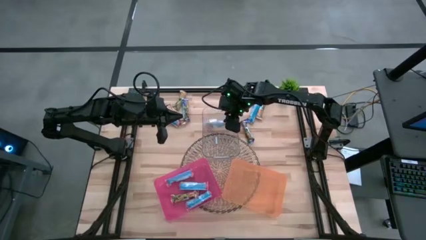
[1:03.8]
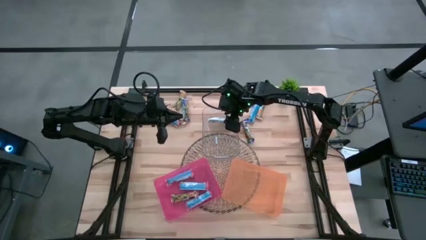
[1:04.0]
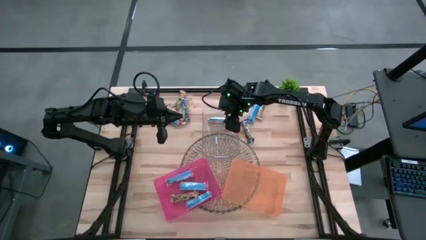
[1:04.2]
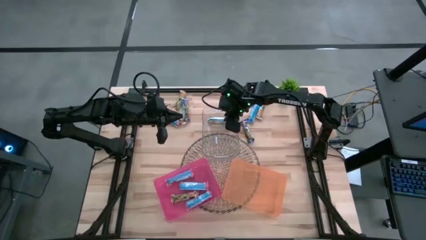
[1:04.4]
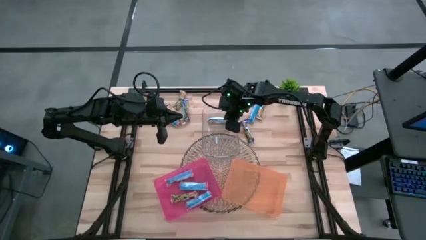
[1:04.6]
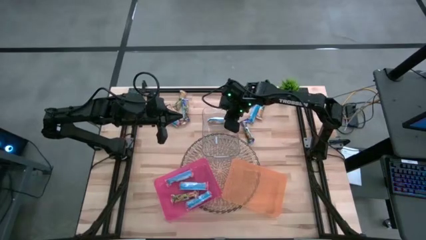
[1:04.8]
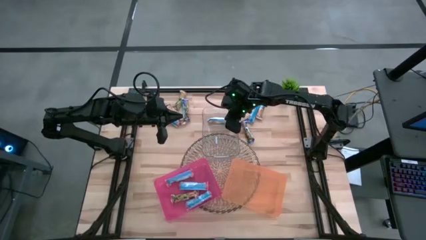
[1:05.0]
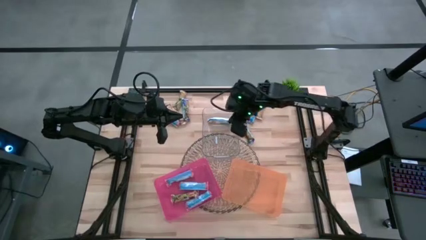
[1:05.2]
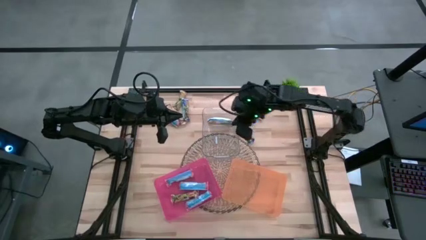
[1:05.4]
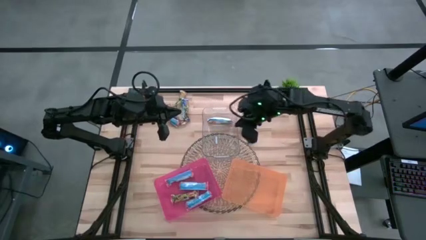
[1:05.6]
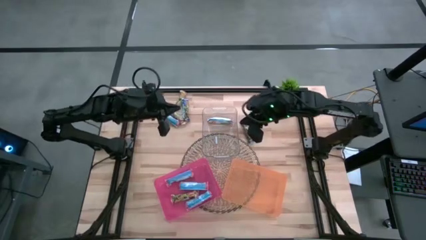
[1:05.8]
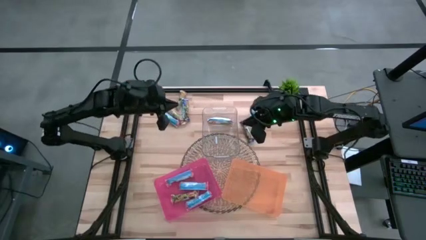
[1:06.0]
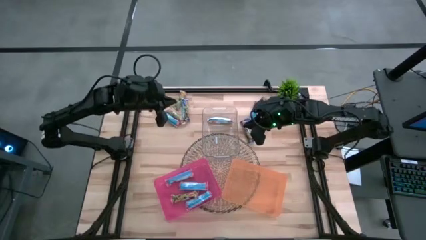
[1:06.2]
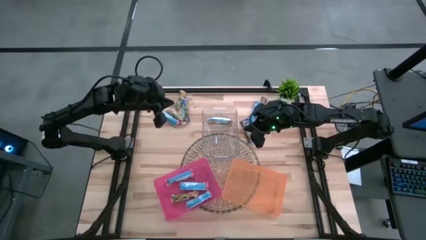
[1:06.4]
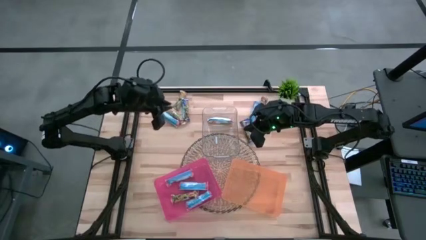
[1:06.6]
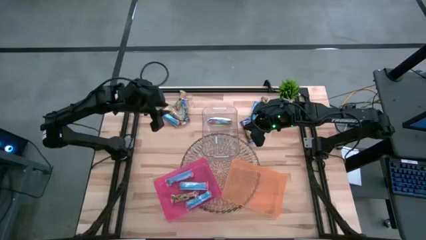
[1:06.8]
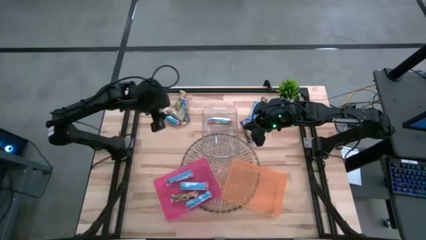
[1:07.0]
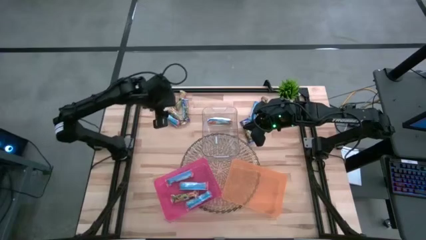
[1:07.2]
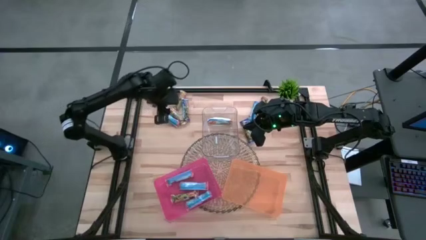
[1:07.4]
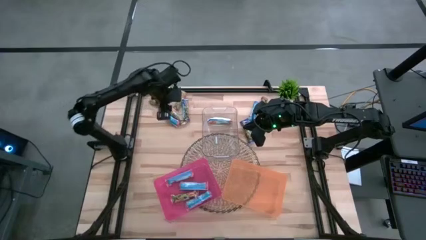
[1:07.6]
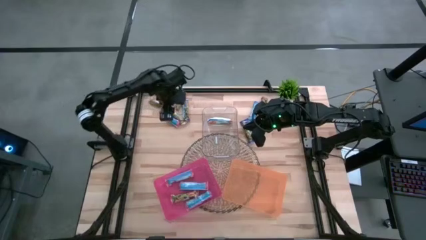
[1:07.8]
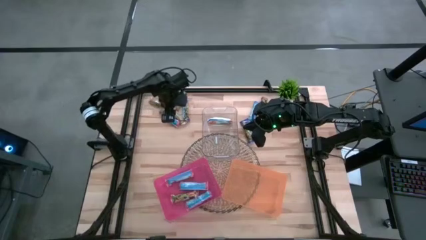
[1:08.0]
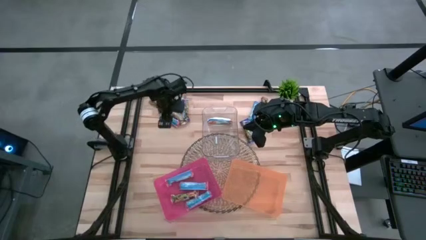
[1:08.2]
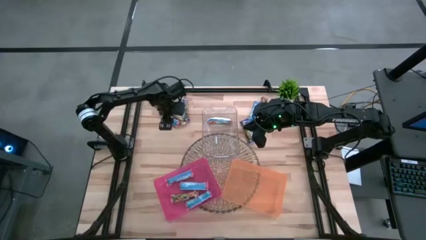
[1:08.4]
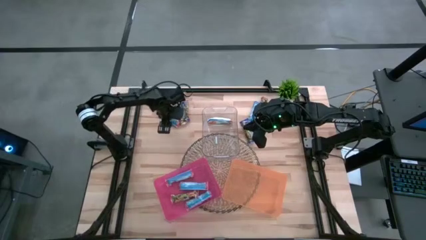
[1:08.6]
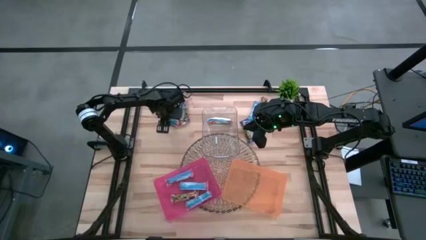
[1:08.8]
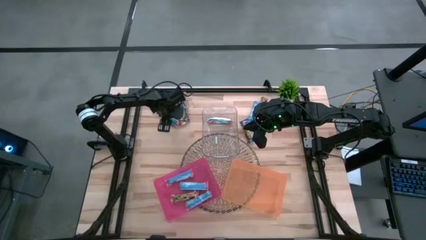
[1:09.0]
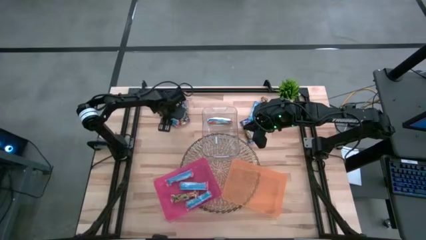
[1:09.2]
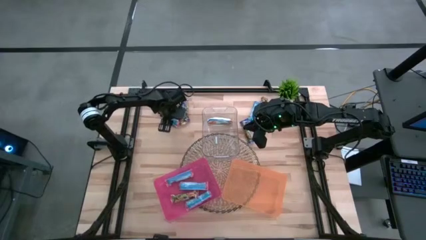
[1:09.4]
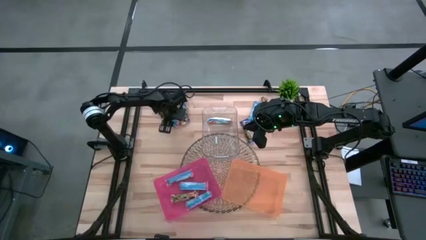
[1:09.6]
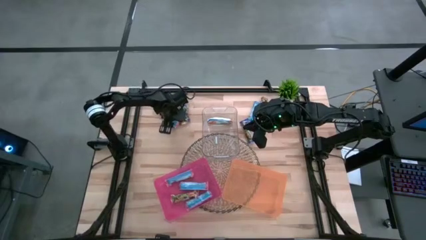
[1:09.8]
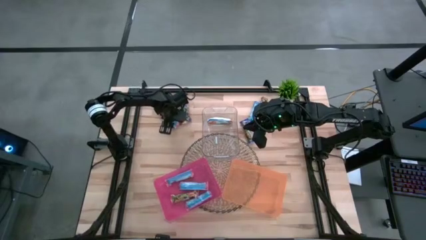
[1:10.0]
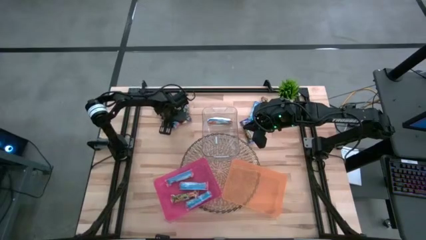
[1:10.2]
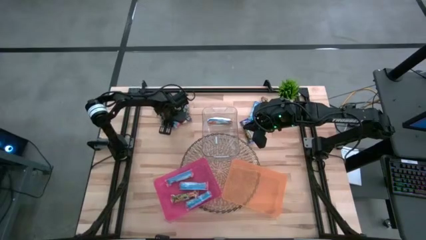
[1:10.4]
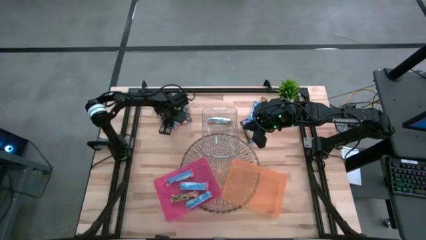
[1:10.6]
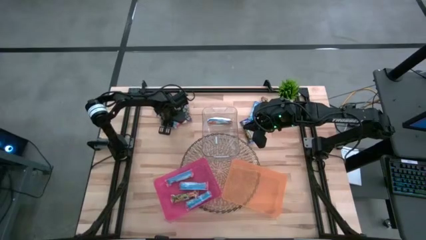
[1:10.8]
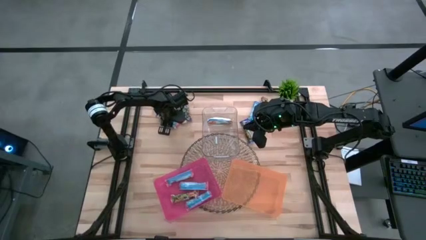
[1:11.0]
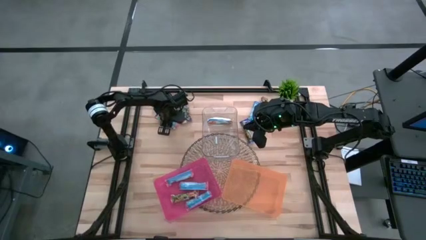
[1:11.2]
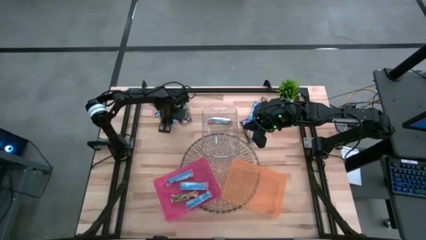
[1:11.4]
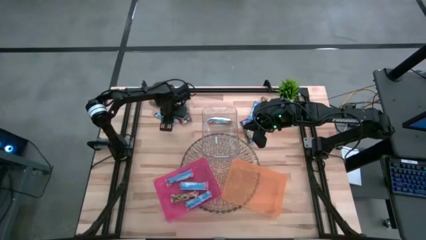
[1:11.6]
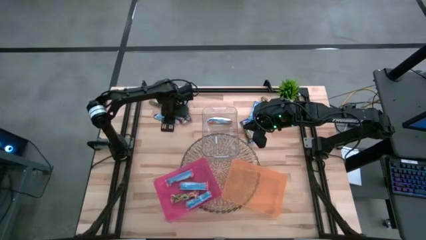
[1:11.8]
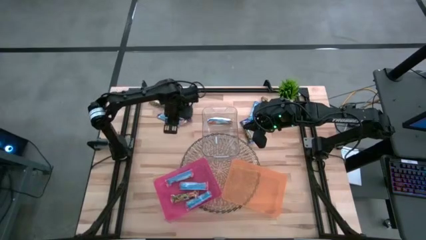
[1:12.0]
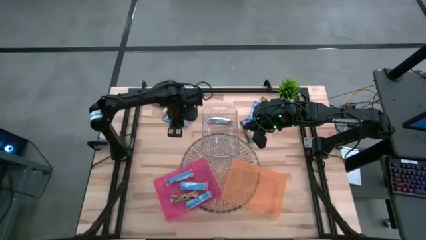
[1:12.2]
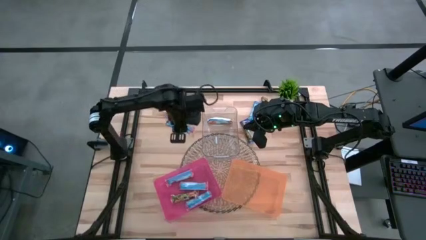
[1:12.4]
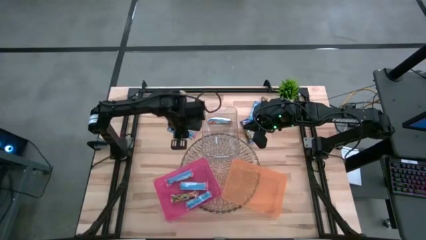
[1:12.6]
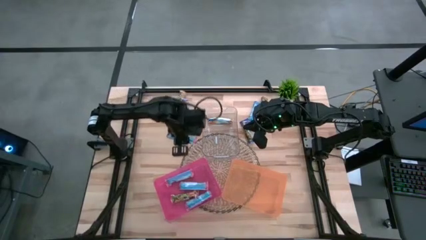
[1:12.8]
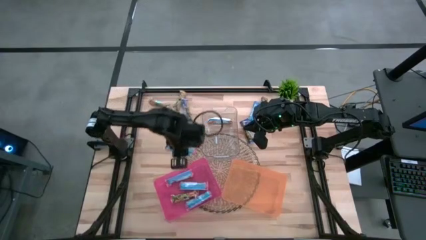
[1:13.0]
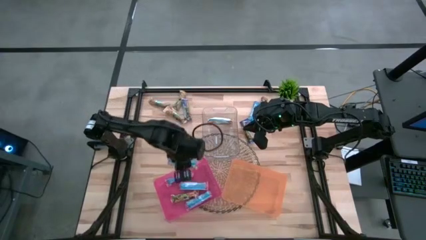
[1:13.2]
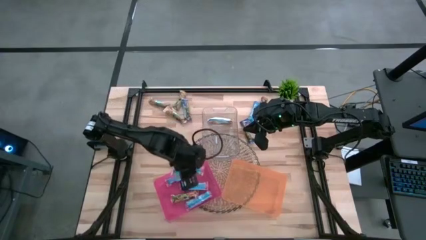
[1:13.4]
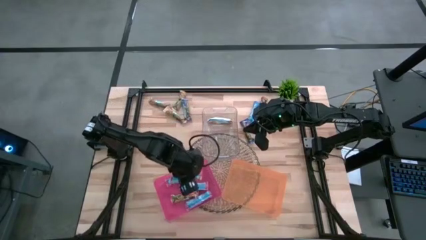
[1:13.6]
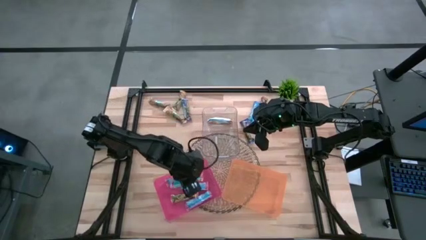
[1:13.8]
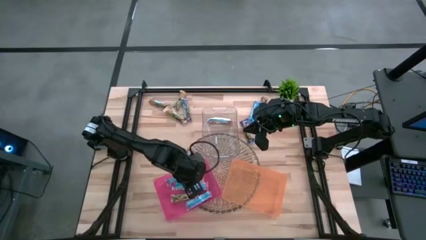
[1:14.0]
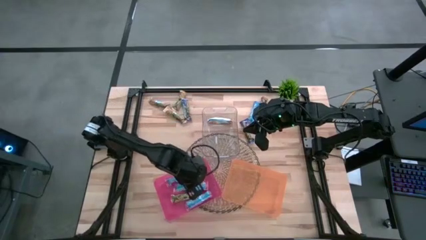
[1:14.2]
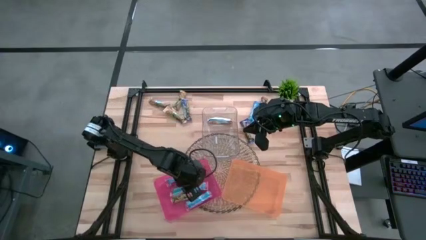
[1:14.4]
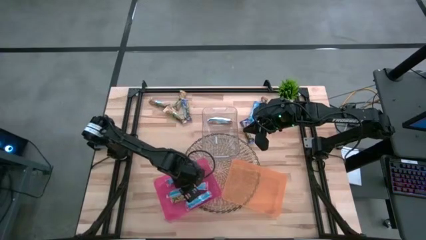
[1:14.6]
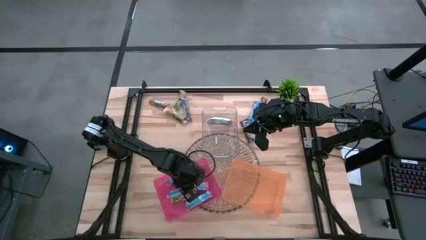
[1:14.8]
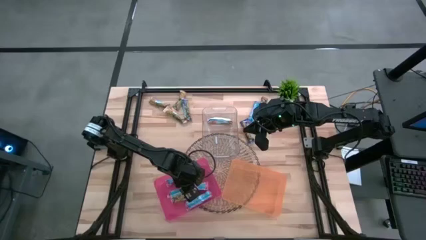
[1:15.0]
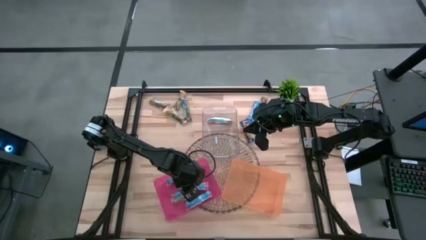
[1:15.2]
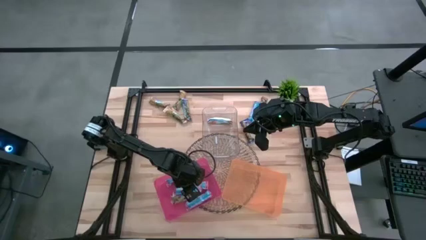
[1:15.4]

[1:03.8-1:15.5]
Task: Pick and place Granola Bars by type
Put the red granola bar into the red bin
